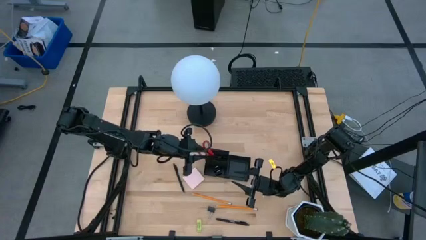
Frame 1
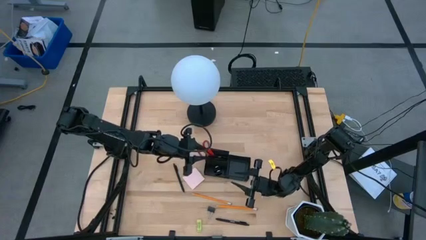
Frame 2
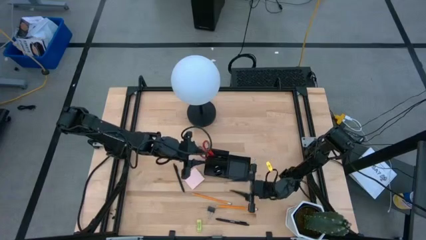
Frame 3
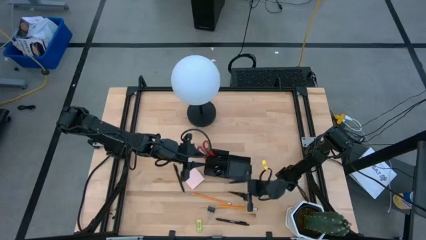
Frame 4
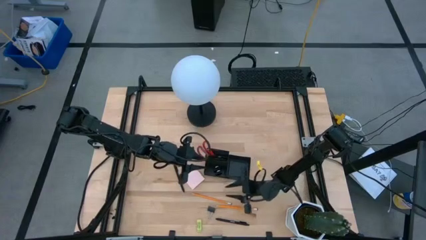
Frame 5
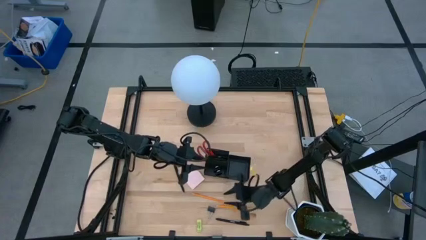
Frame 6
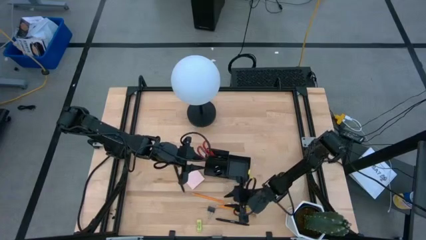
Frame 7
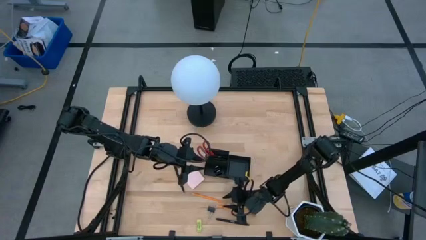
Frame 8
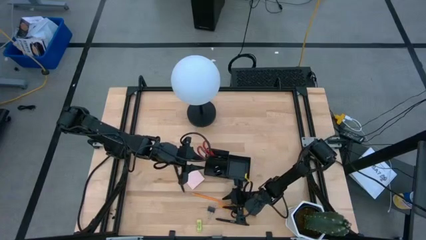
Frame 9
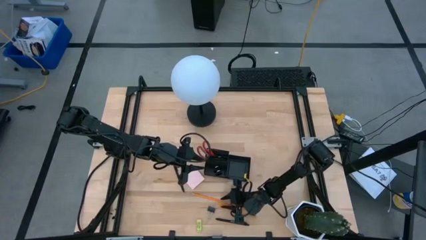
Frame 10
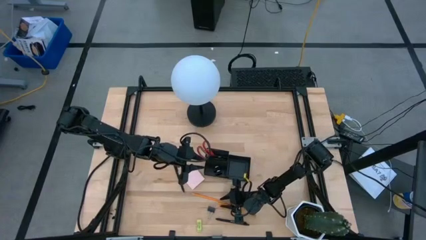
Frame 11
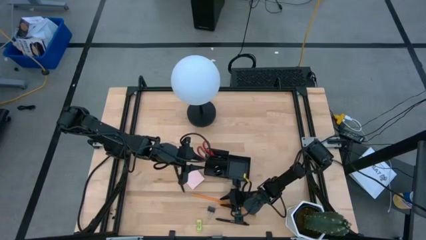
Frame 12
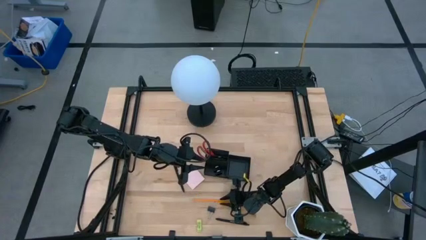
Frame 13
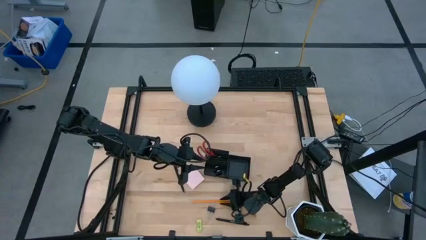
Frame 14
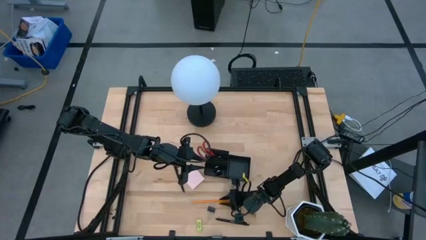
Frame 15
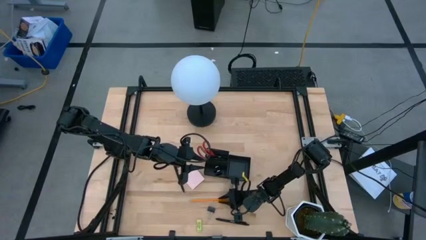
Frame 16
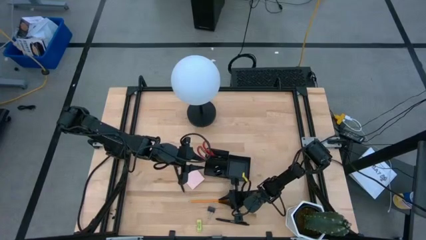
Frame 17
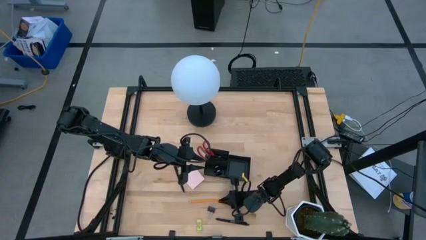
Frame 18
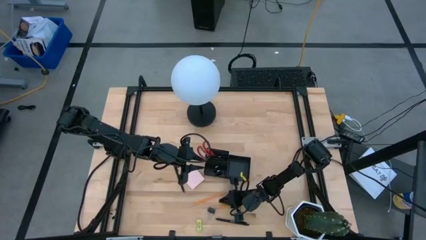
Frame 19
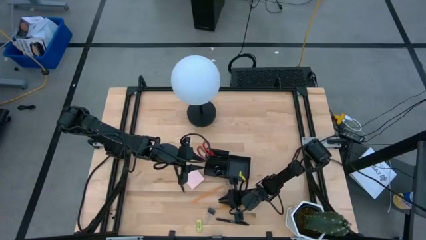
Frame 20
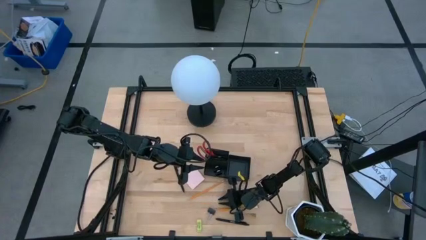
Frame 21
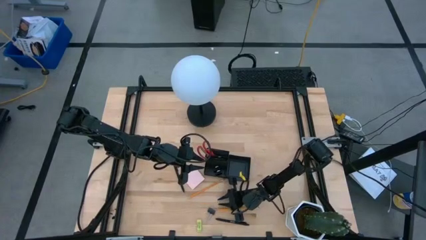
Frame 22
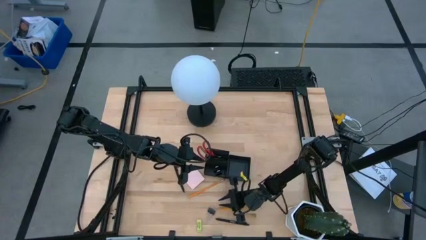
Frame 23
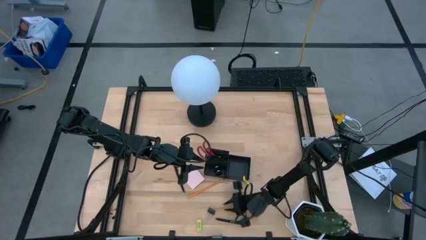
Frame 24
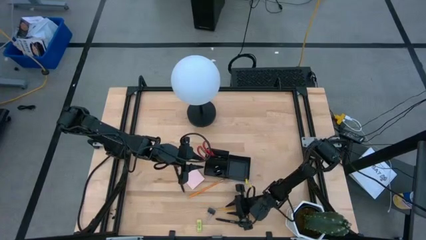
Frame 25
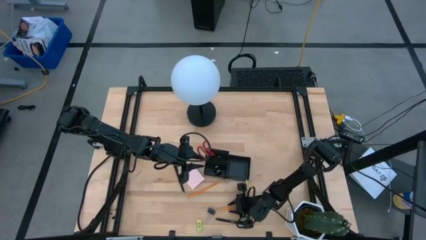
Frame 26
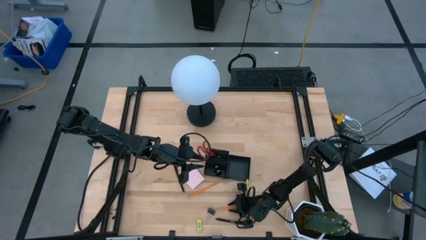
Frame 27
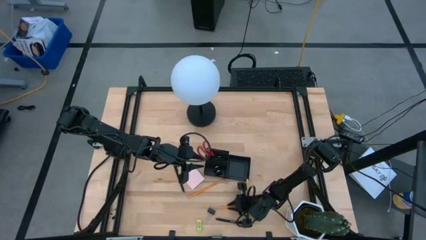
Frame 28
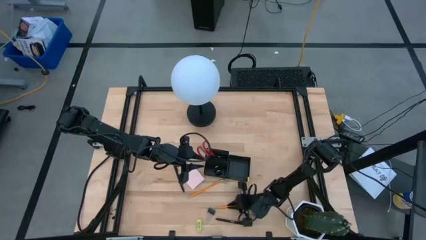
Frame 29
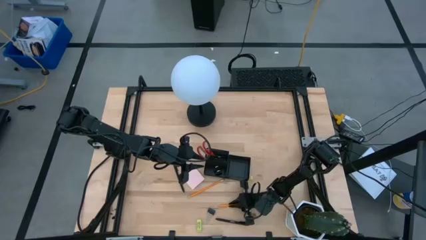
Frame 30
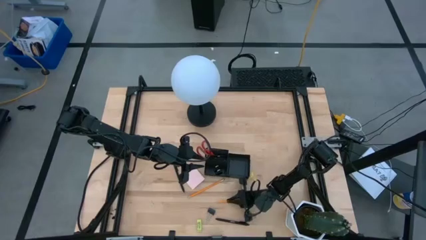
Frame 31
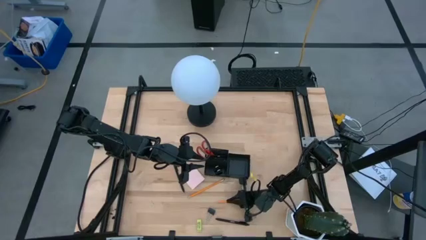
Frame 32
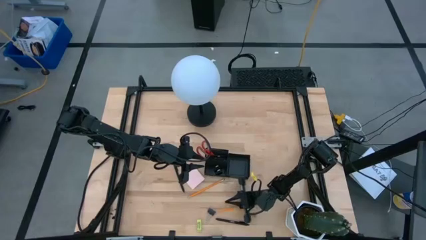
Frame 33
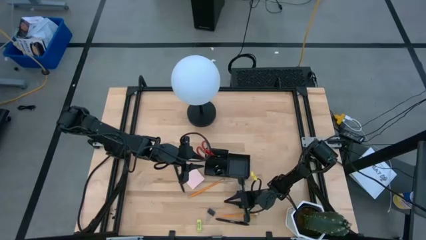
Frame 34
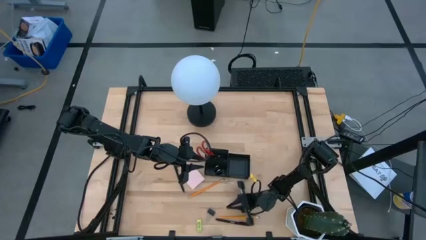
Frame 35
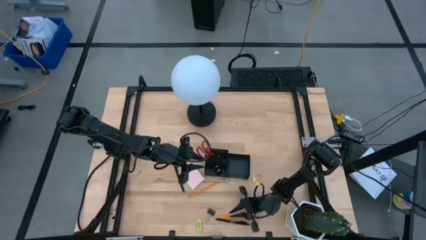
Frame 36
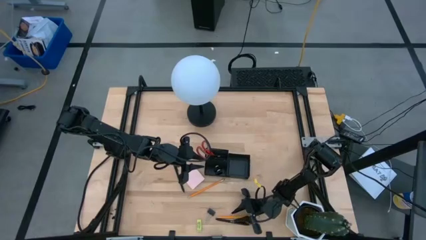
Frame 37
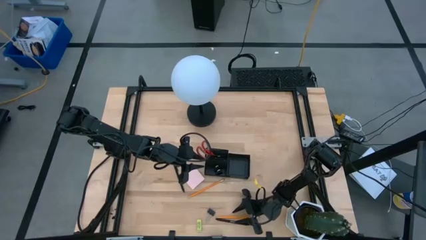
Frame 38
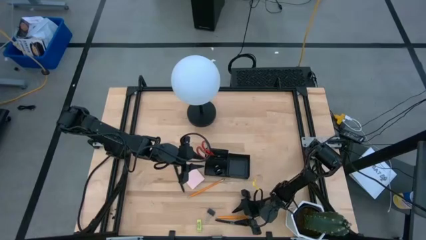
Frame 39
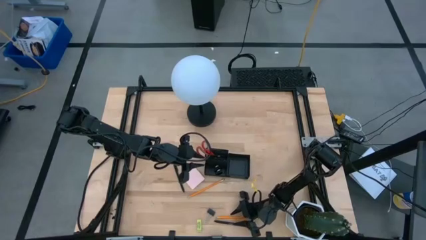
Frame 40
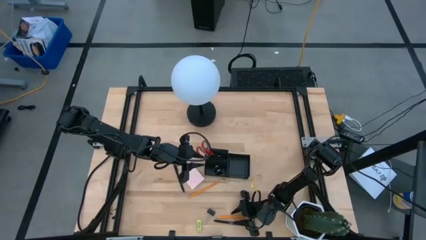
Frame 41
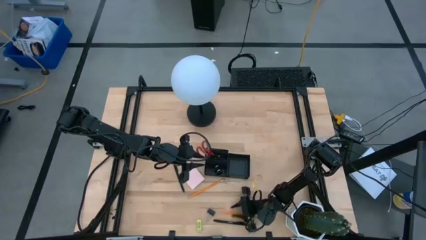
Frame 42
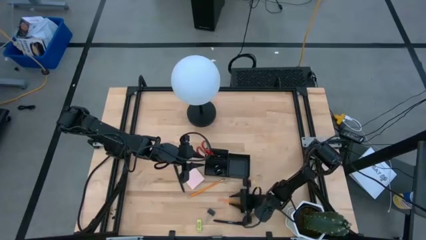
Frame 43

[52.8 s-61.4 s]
Task: Pick and place office supplies into organizer
Put the yellow pencil into the desk organizer

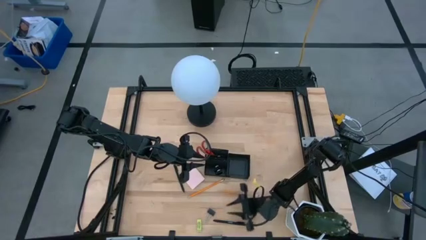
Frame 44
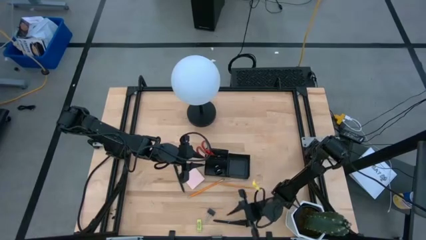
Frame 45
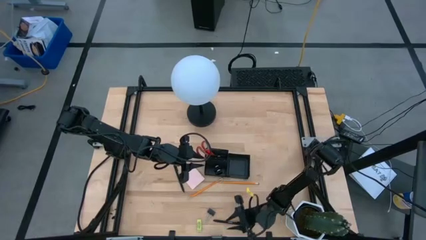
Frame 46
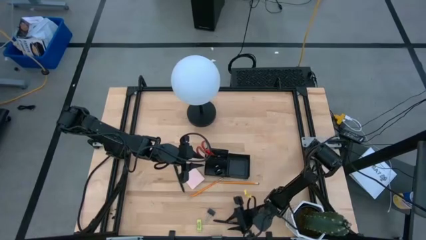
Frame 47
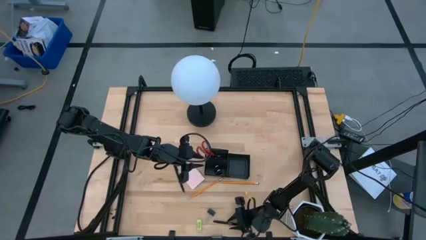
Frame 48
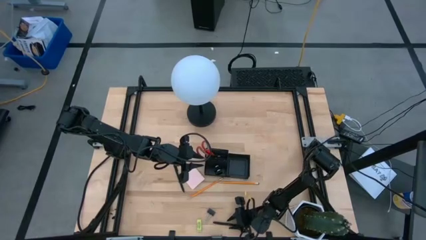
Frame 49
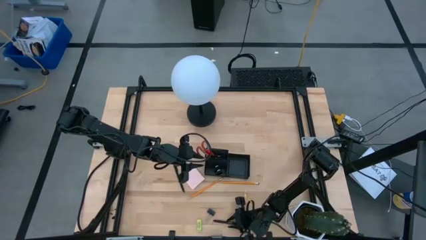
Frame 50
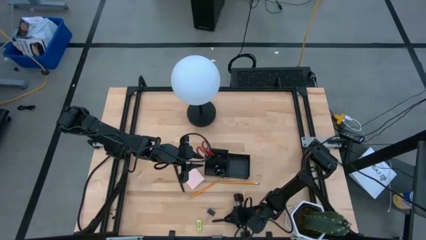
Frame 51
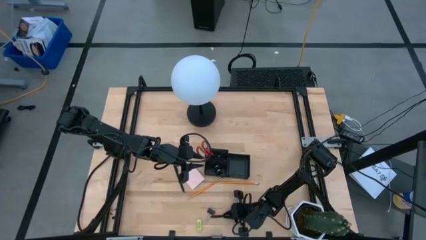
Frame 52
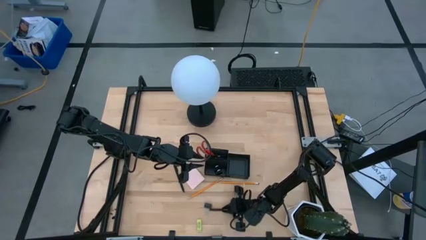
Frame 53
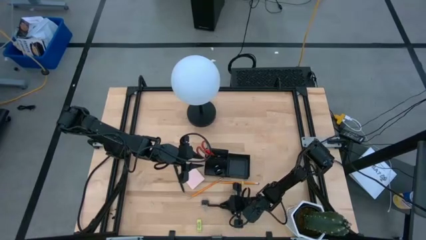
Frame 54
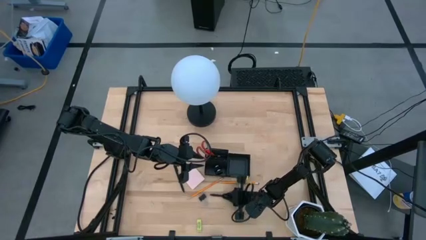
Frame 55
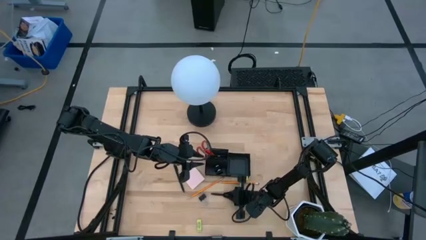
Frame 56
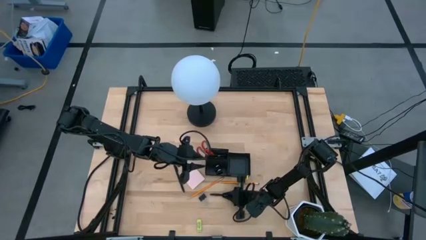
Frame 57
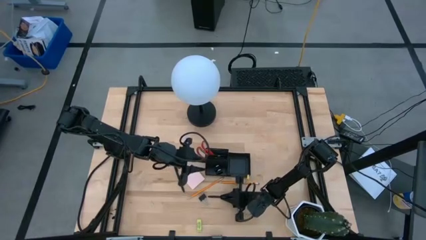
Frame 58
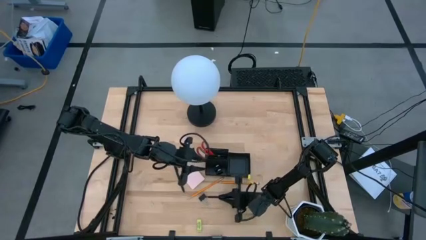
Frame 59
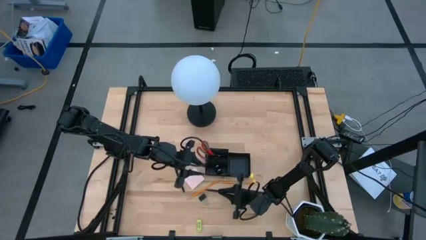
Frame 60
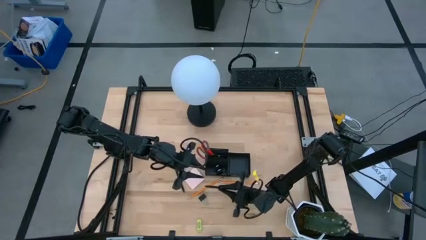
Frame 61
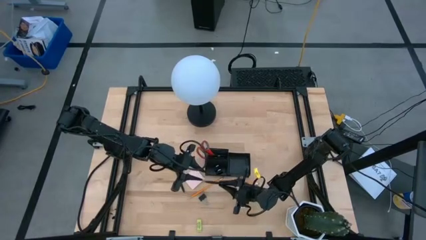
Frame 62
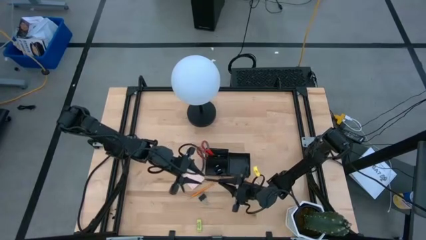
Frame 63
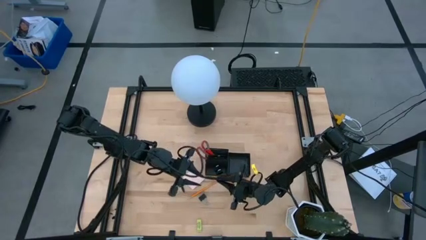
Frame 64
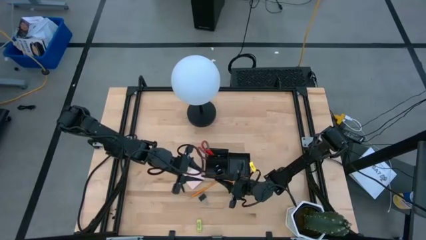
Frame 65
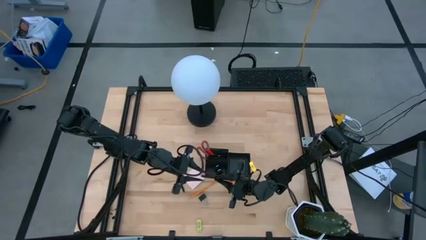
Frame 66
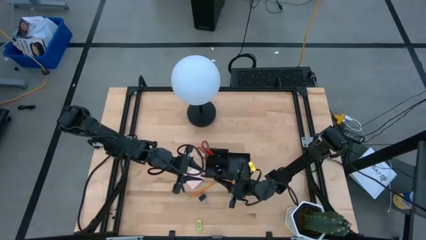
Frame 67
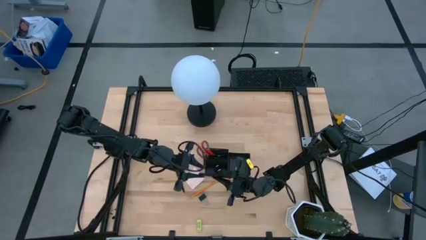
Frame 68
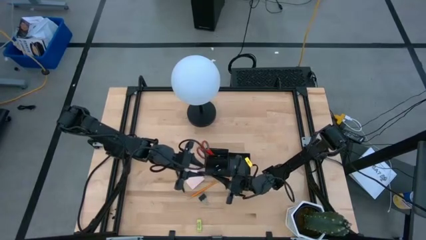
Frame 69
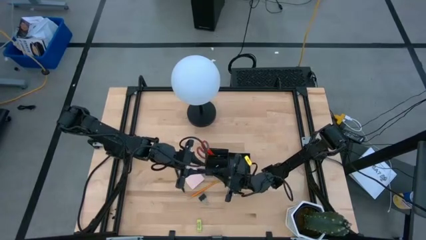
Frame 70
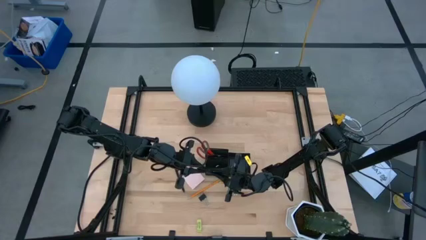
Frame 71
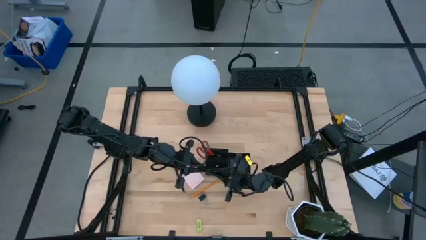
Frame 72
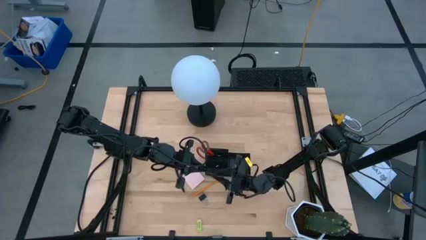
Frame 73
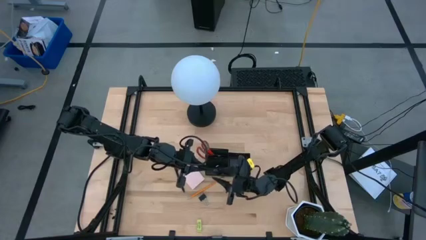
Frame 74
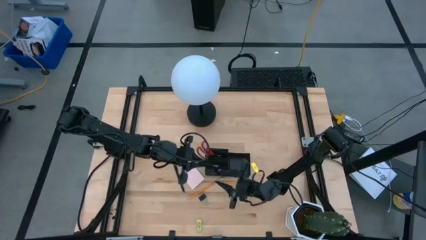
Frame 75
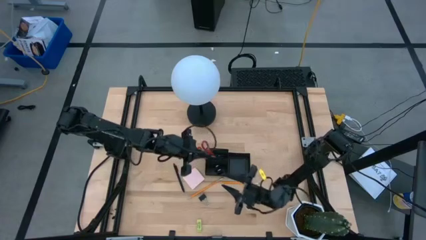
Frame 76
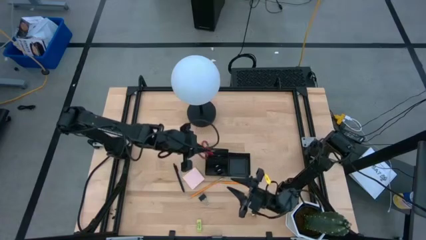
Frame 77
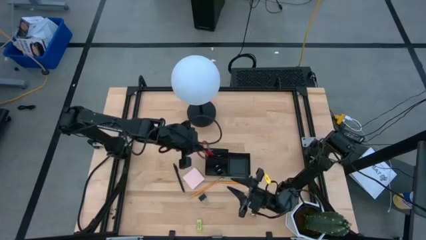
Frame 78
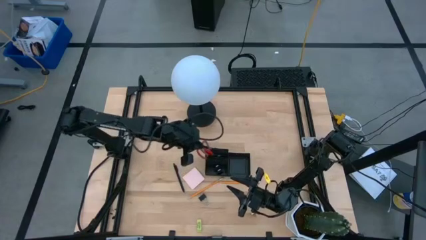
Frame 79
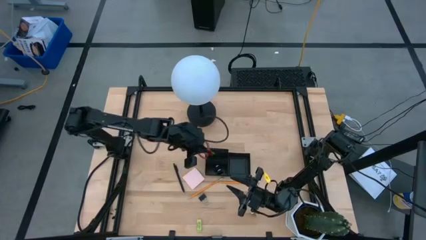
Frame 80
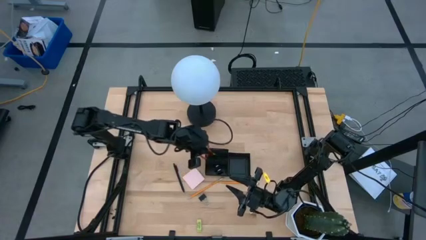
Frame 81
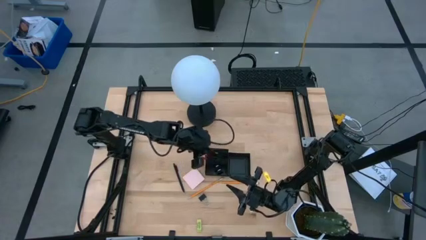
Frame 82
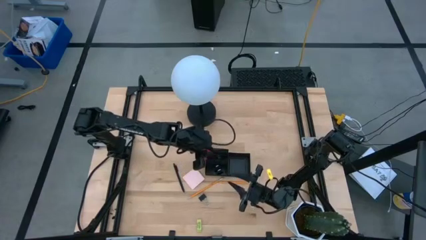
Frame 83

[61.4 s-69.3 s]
Put the black pen into the desk organizer
